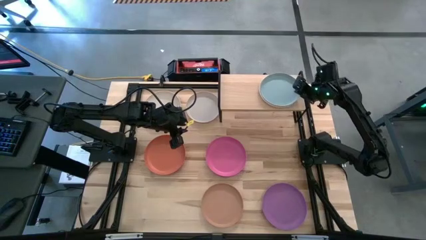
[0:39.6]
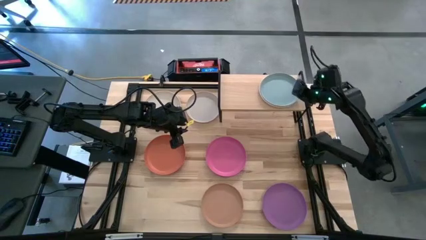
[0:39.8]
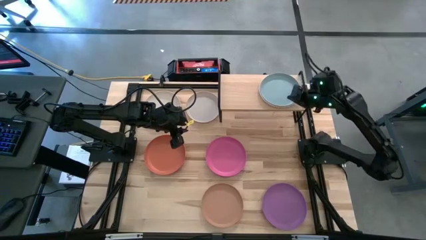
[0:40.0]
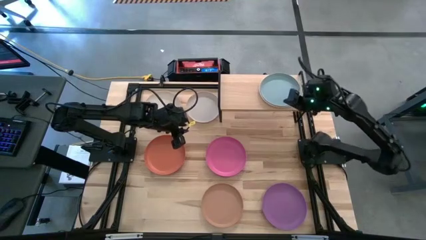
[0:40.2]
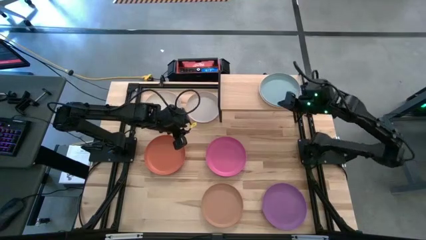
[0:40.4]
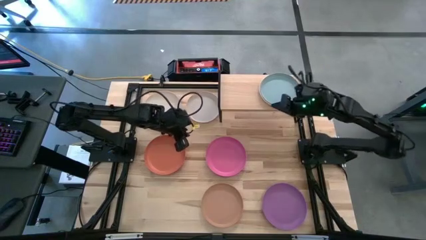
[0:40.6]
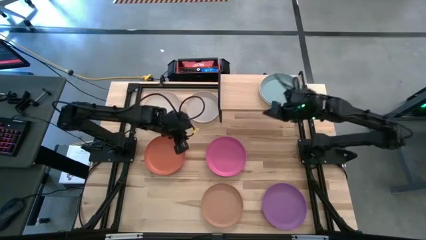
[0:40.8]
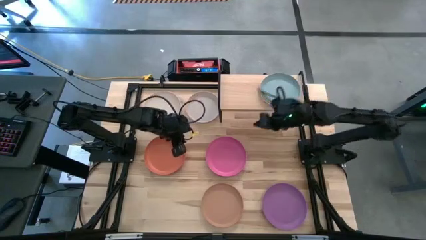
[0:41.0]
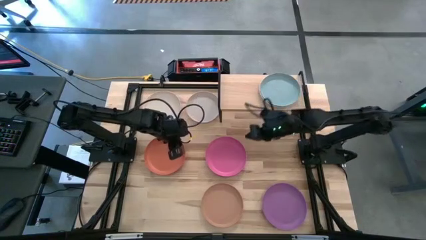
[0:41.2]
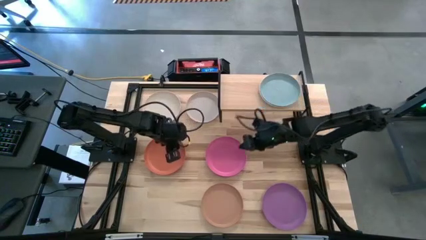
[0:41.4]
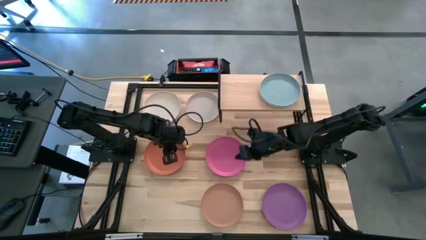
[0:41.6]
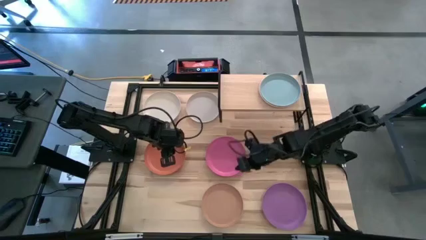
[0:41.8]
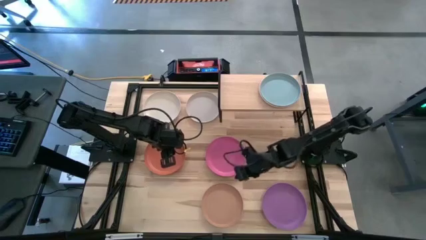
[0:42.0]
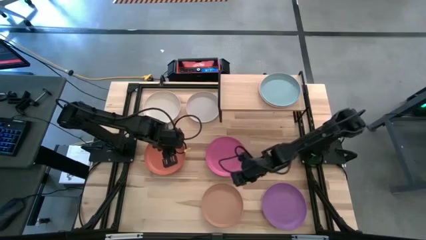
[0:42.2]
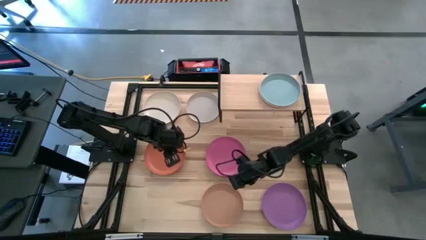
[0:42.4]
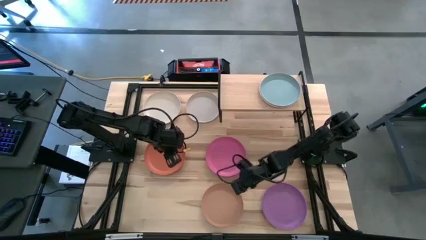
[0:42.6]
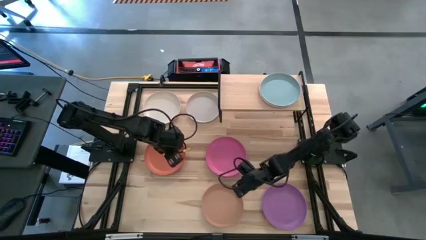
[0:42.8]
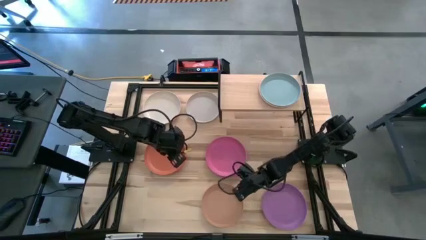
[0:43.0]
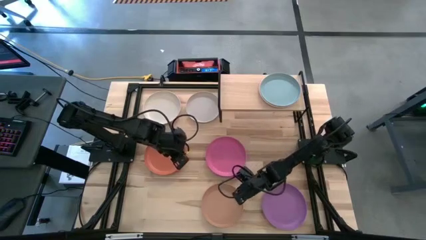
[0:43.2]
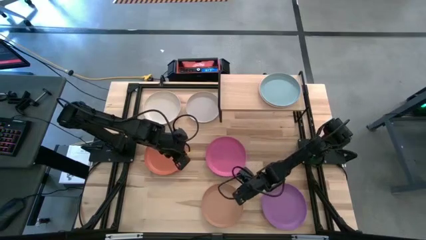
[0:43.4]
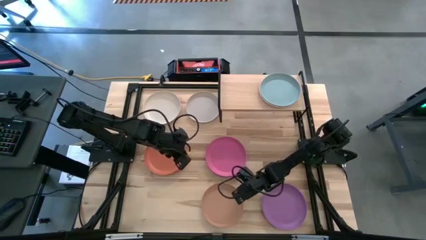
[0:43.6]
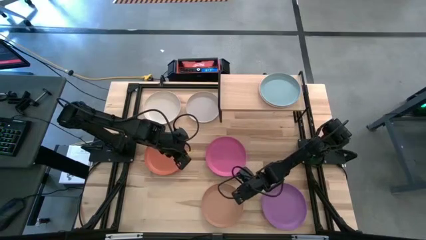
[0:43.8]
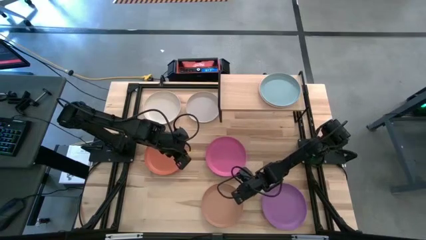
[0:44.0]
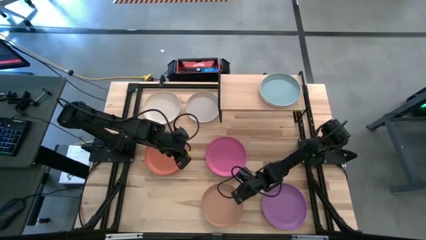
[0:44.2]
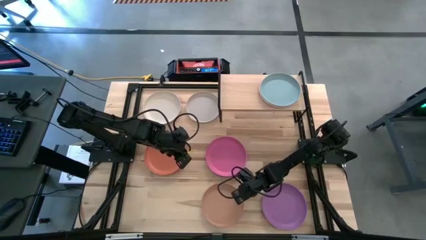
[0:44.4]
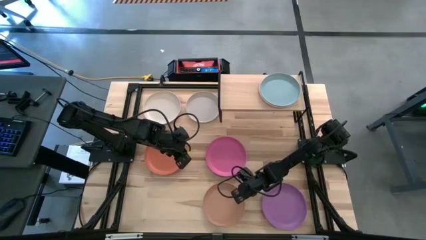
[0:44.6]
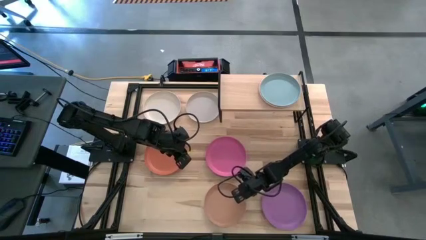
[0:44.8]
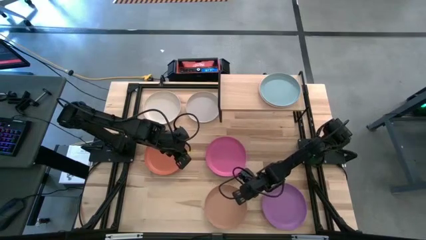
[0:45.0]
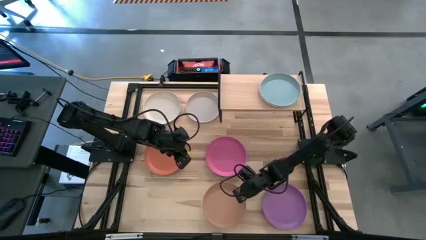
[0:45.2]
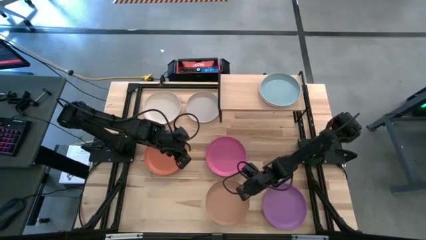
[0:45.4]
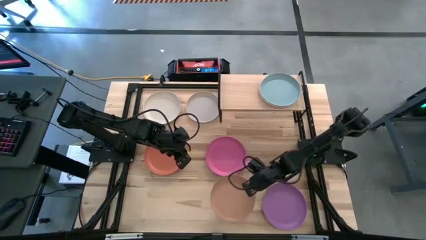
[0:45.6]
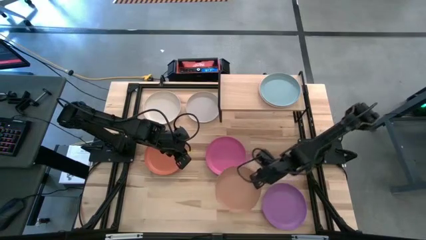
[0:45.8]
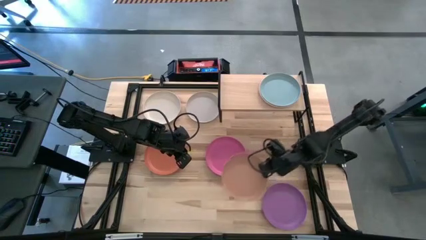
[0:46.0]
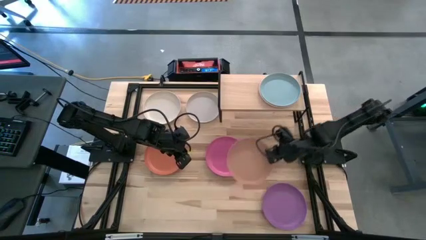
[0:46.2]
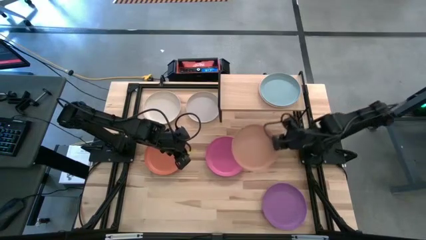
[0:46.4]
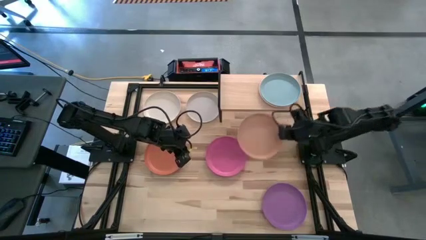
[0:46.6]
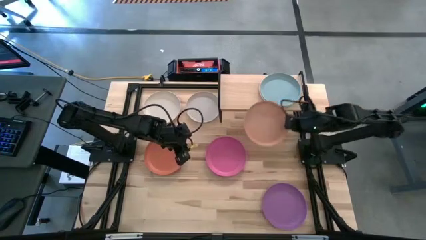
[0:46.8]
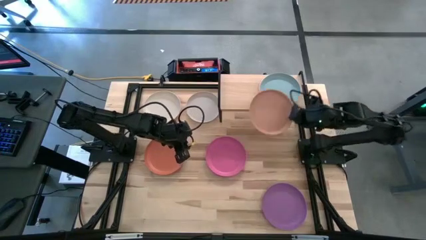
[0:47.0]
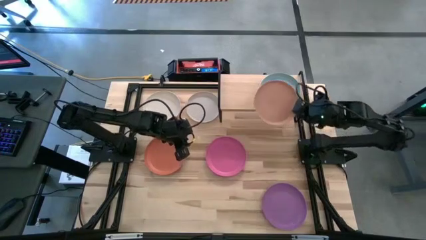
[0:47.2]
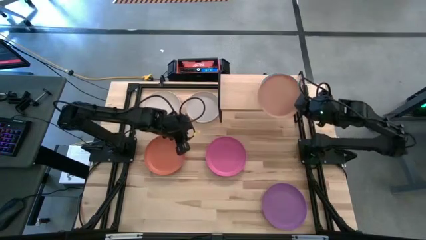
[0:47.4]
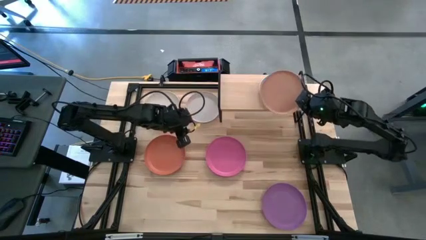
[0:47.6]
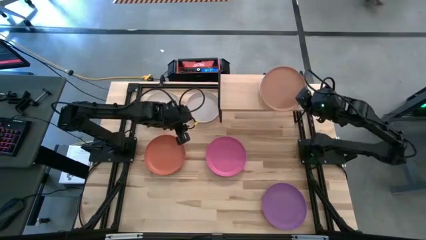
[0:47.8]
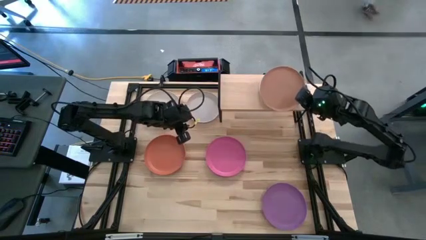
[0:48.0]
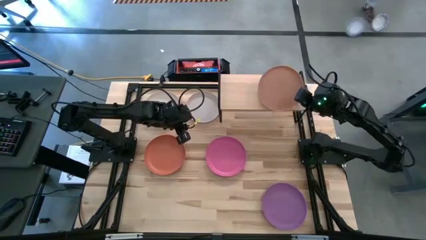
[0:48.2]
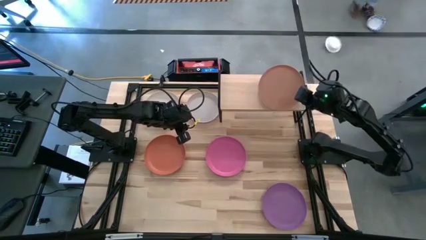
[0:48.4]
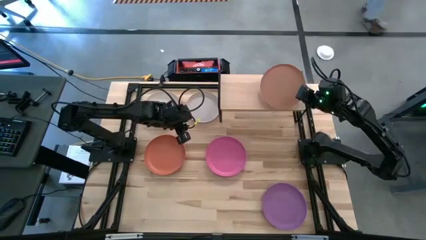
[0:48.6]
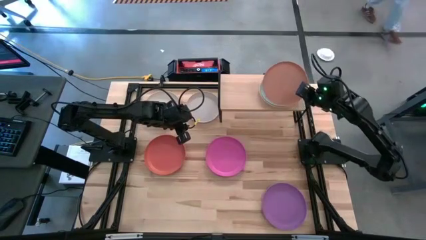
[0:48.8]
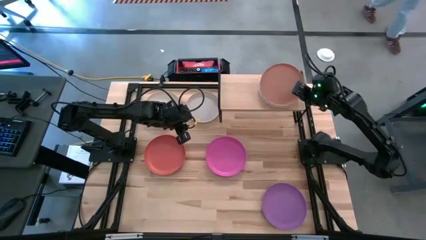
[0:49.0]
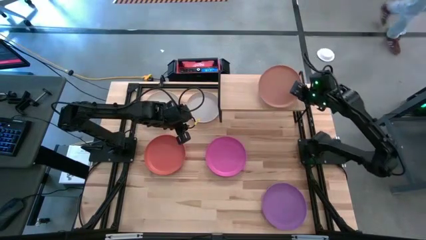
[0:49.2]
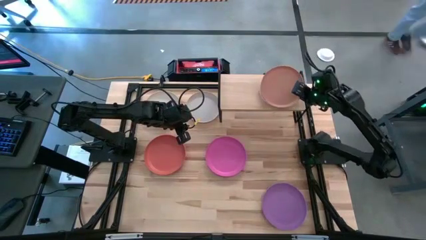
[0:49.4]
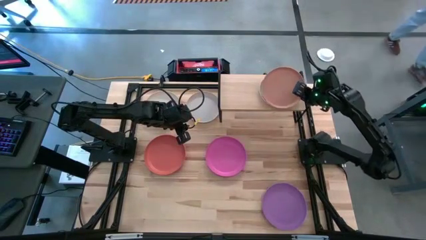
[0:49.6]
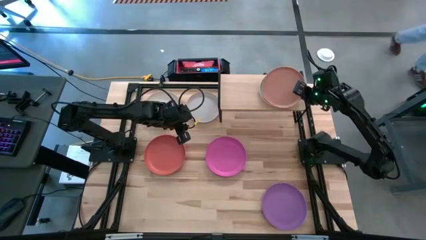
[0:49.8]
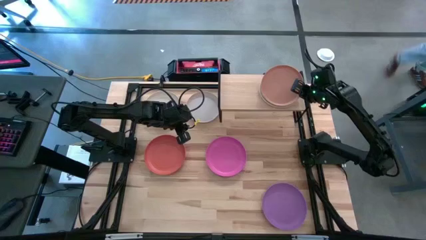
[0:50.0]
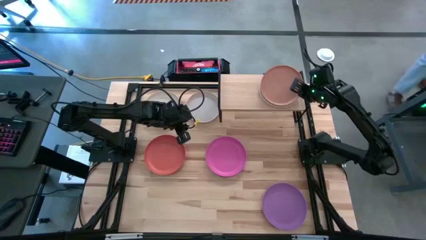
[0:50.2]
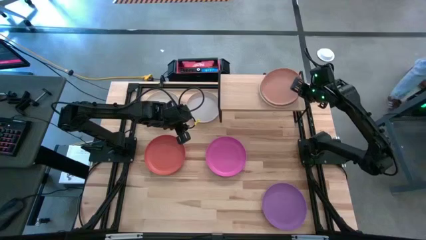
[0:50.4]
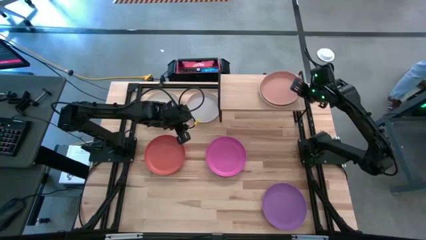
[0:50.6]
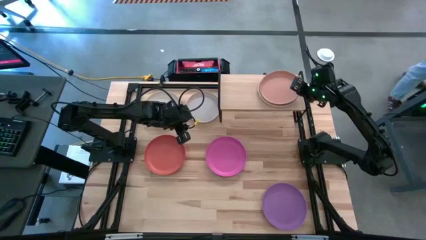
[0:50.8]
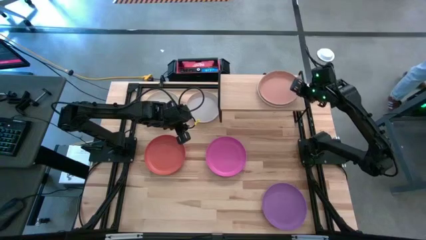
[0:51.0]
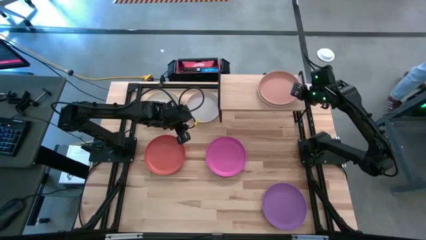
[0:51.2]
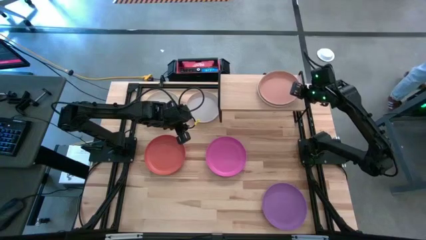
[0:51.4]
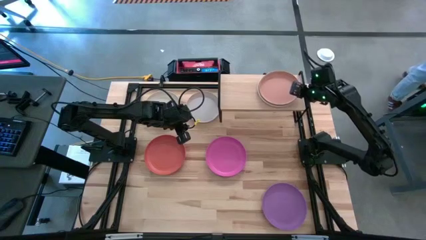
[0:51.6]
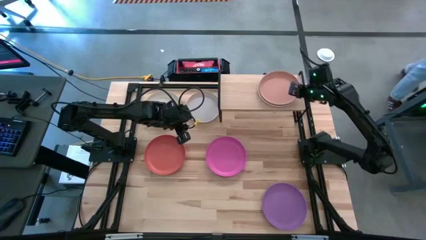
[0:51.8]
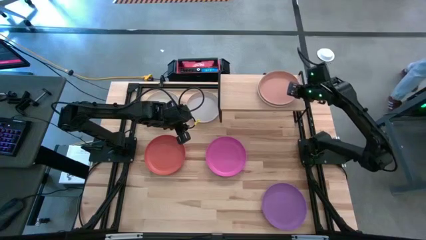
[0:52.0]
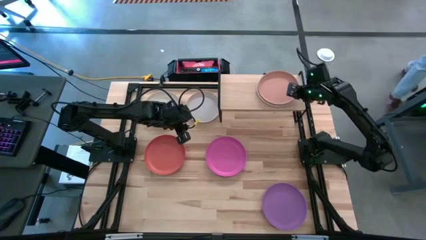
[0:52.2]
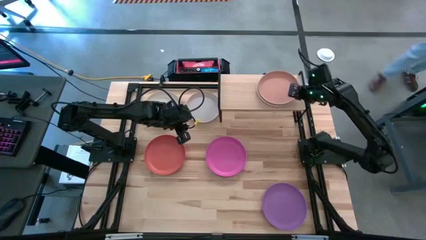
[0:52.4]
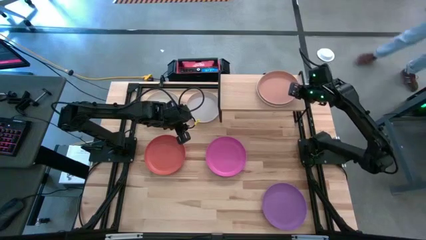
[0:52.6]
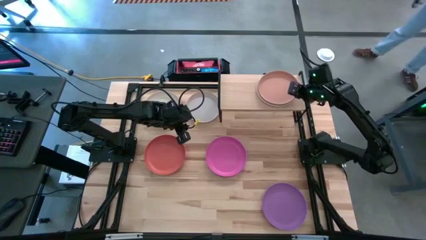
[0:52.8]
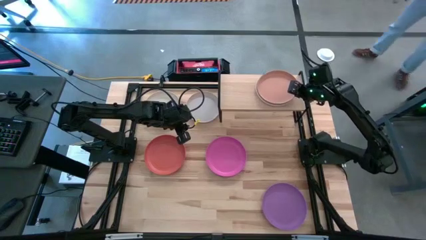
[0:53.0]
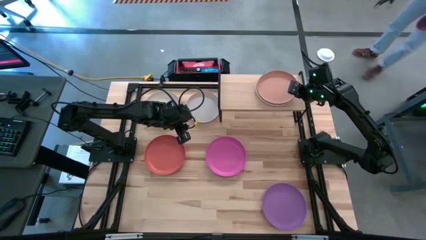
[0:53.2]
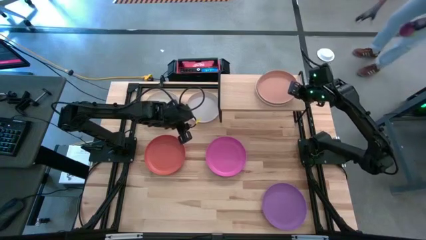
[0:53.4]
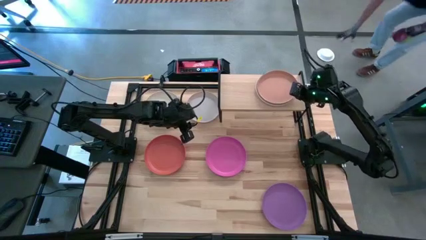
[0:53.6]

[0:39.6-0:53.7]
Task: Place and stack plates onto a shelf
Stack the brown plate on top of the blue plate on the shelf
